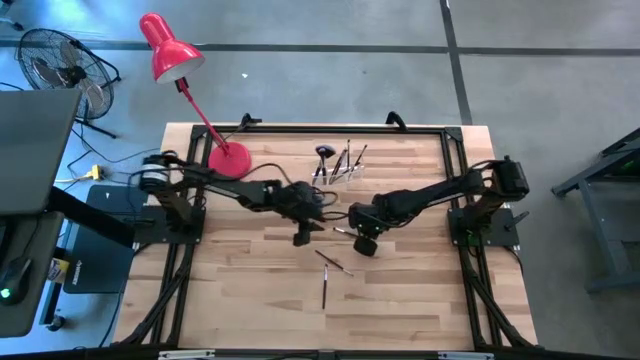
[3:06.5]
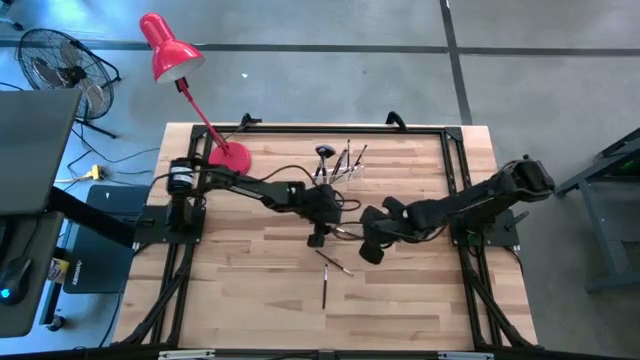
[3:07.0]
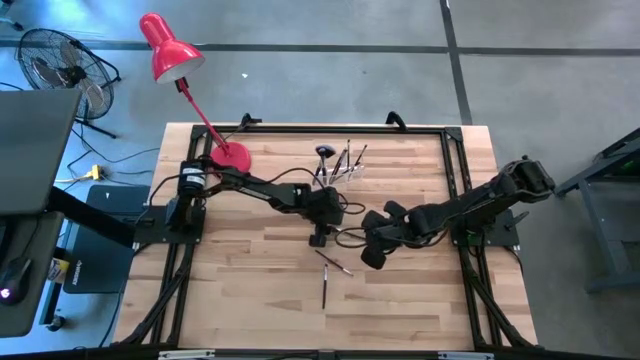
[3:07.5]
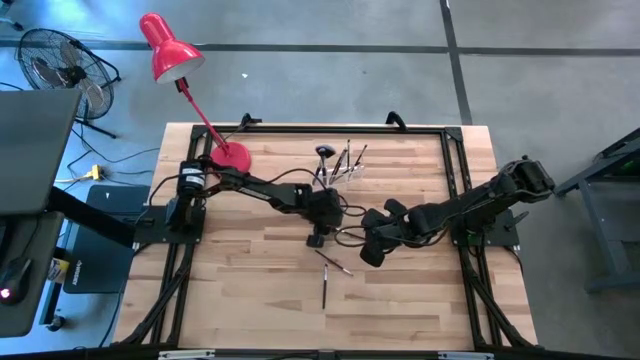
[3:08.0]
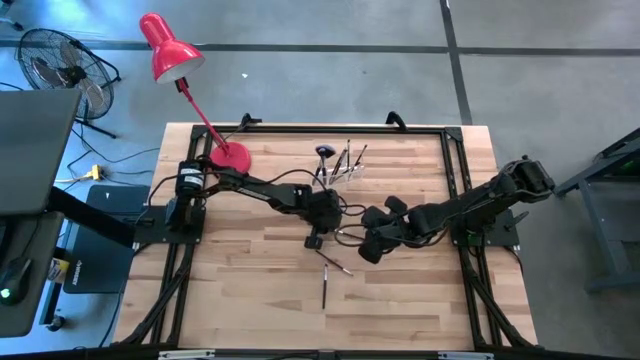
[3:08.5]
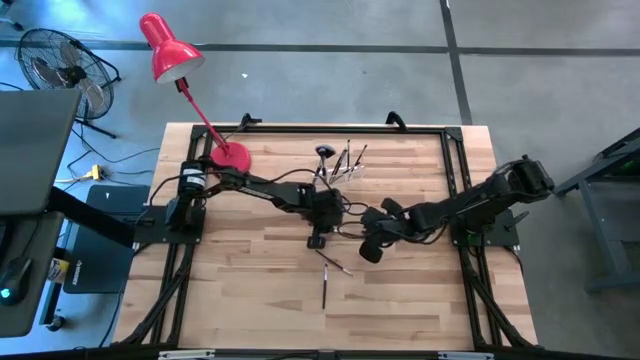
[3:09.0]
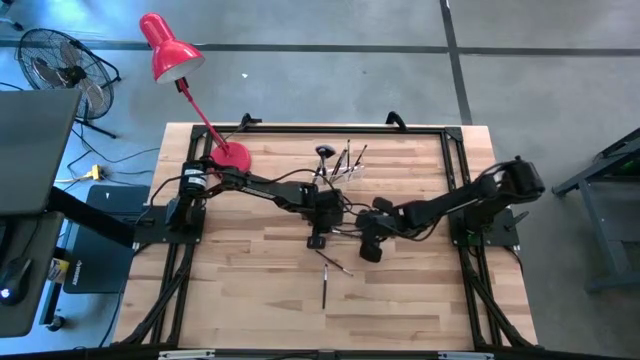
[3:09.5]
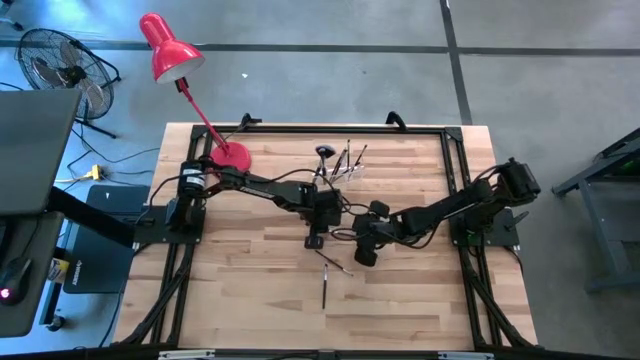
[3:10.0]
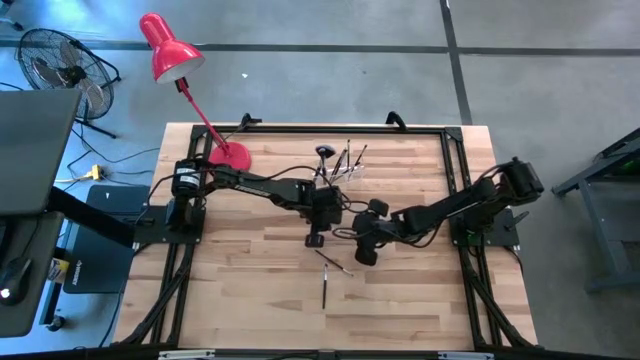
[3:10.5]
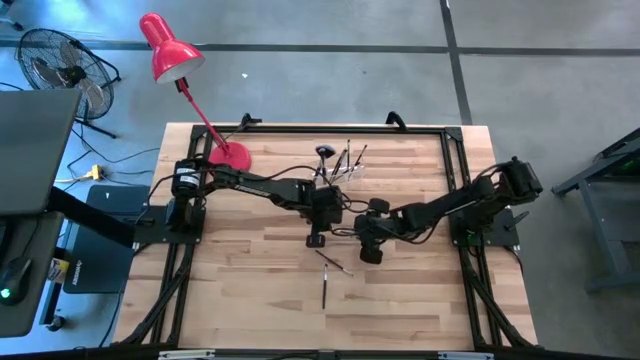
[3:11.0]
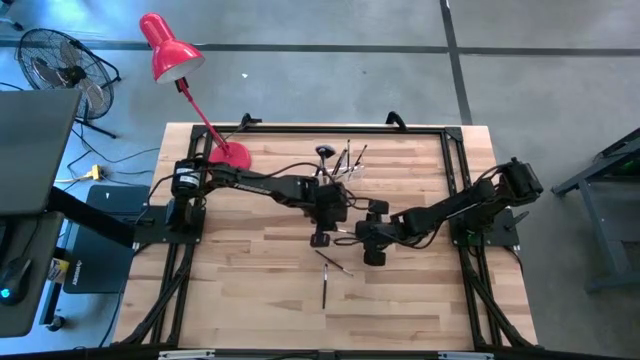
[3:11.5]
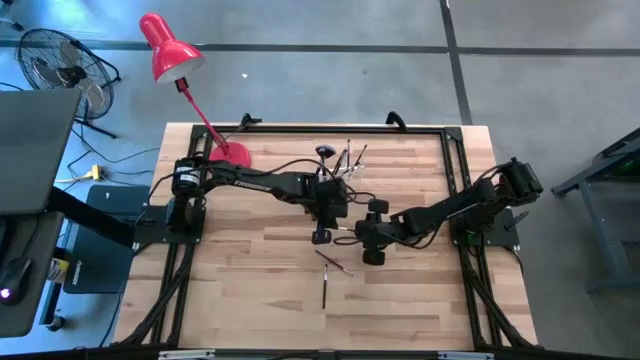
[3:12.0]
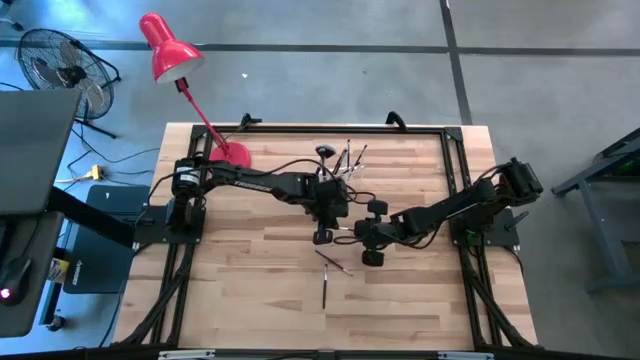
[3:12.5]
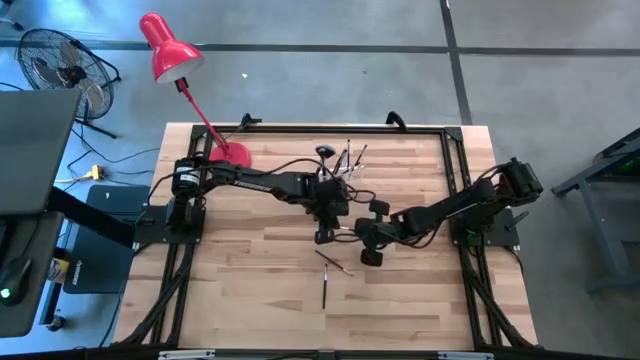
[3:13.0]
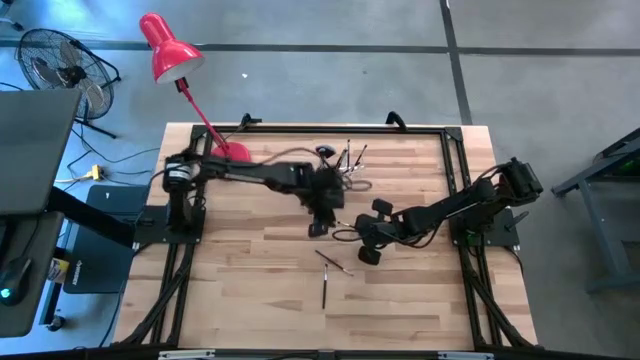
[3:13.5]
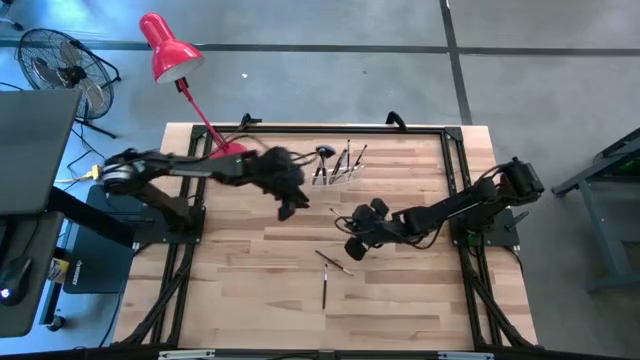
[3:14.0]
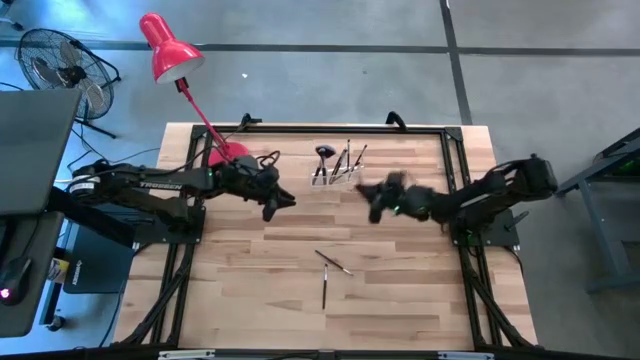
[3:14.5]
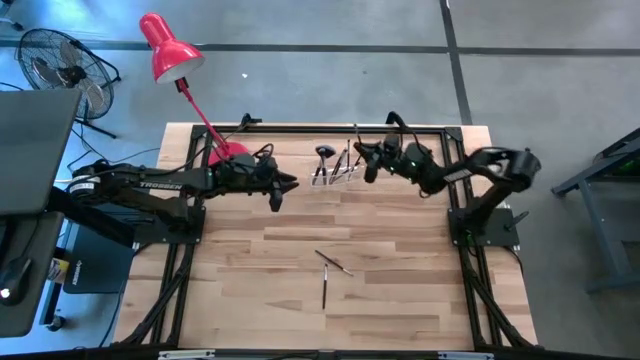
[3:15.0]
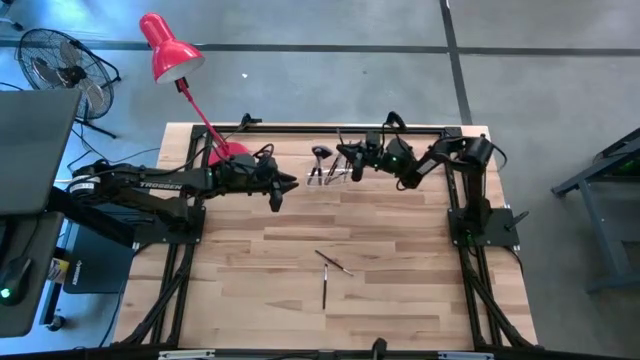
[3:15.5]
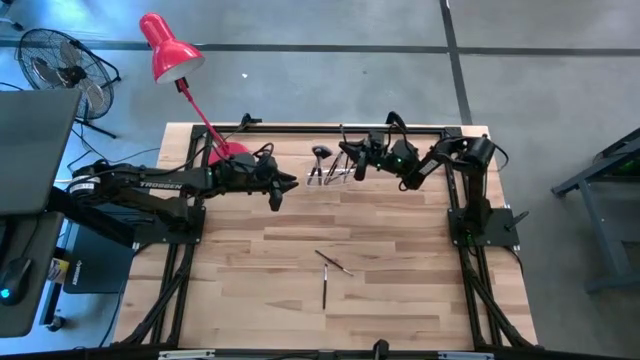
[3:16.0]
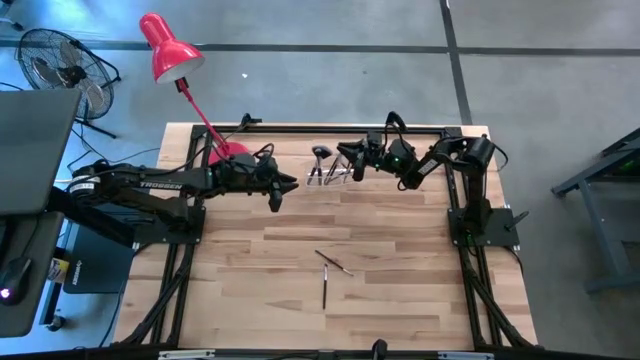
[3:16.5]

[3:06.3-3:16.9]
Task: Put items in baskets/containers
Put the eyeshadow brush into the transparent organizer

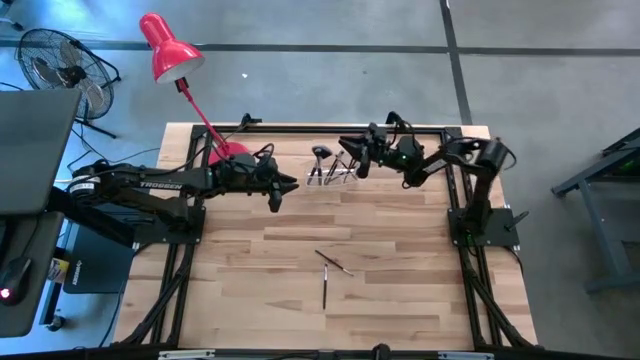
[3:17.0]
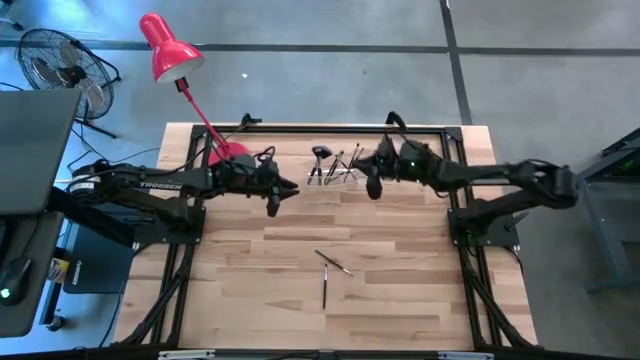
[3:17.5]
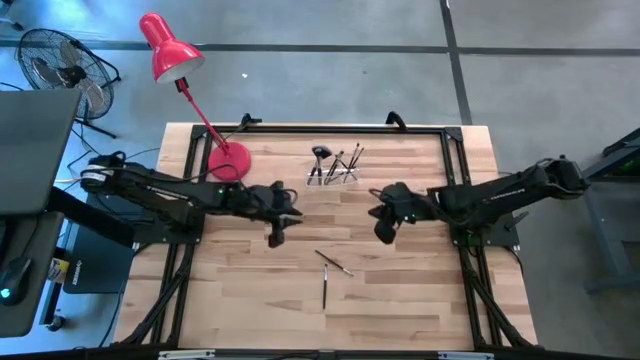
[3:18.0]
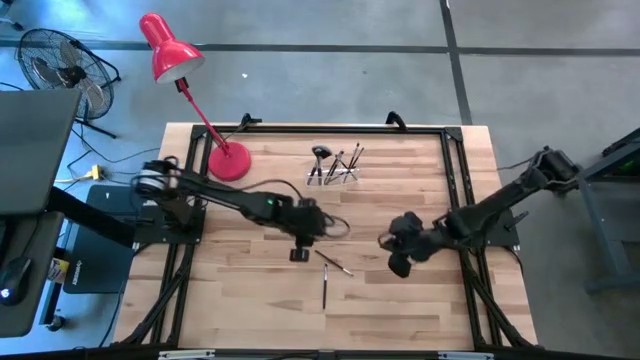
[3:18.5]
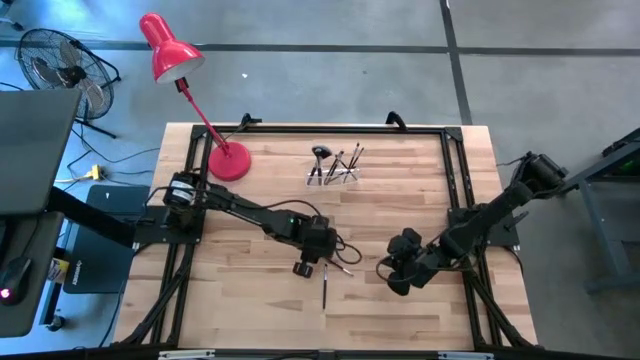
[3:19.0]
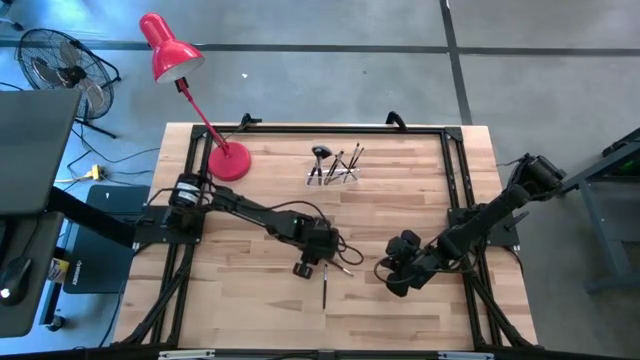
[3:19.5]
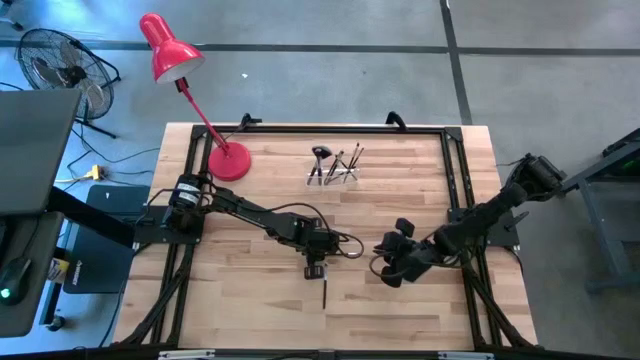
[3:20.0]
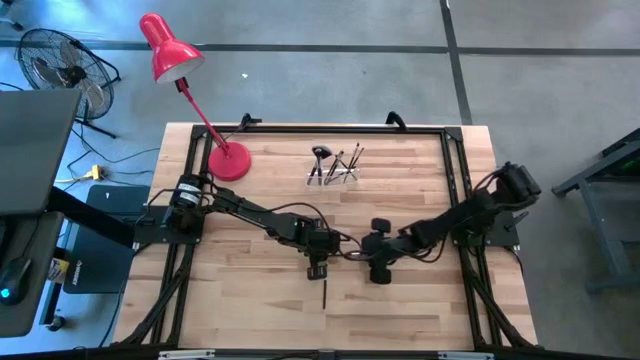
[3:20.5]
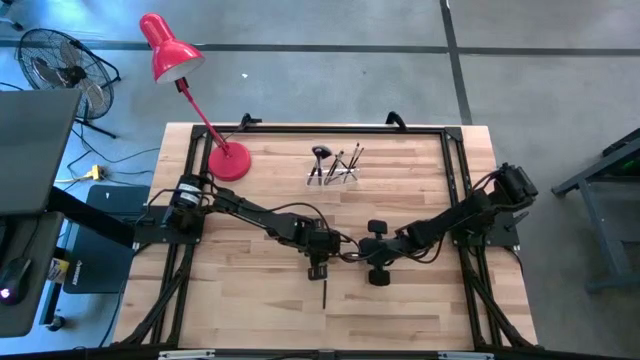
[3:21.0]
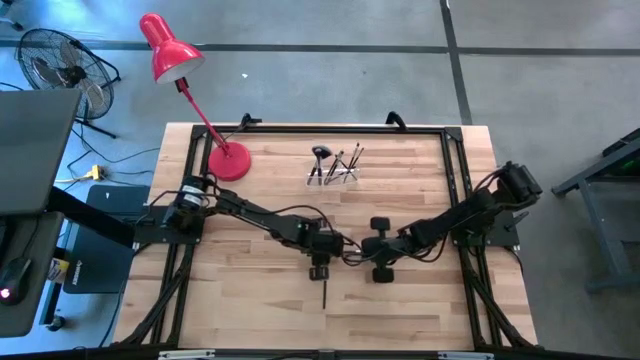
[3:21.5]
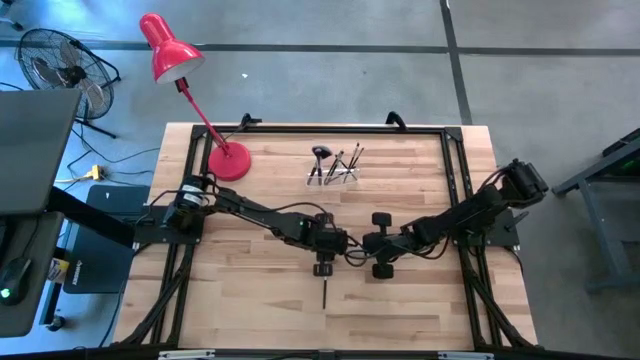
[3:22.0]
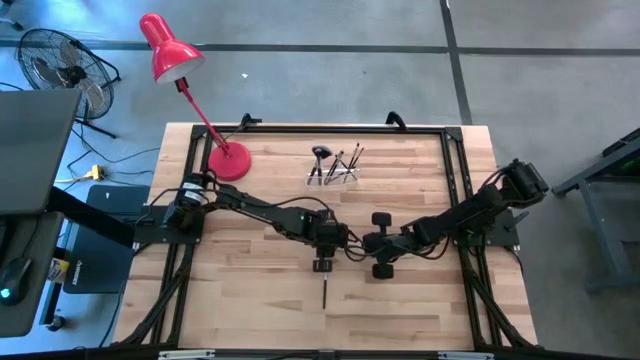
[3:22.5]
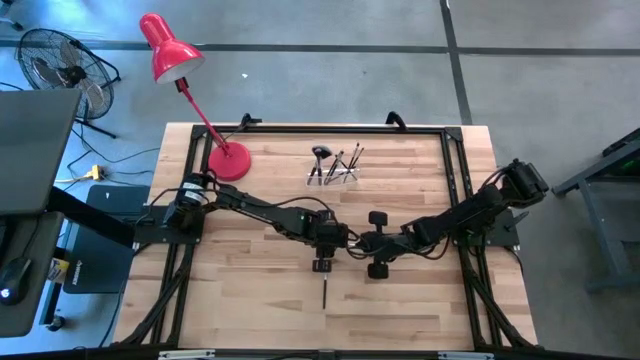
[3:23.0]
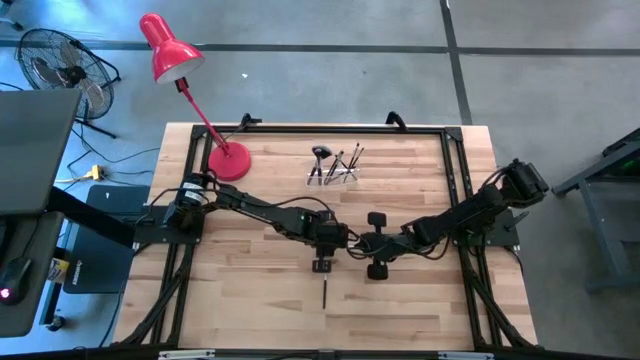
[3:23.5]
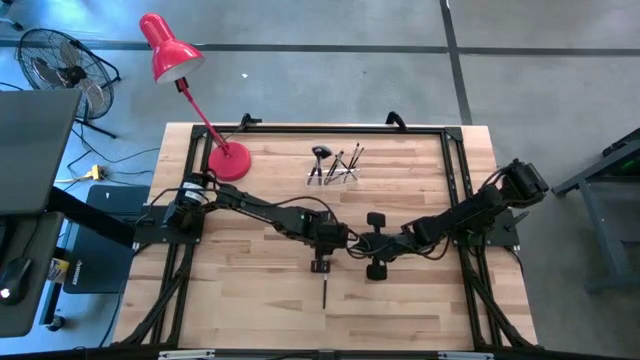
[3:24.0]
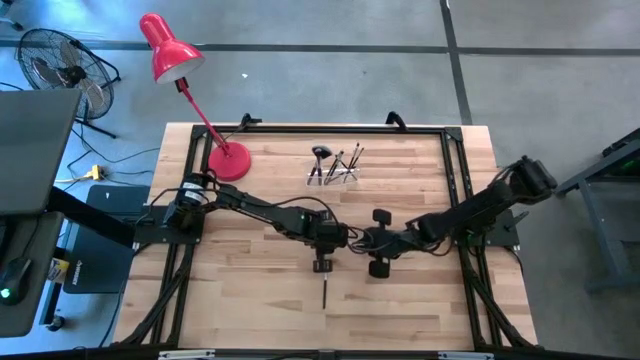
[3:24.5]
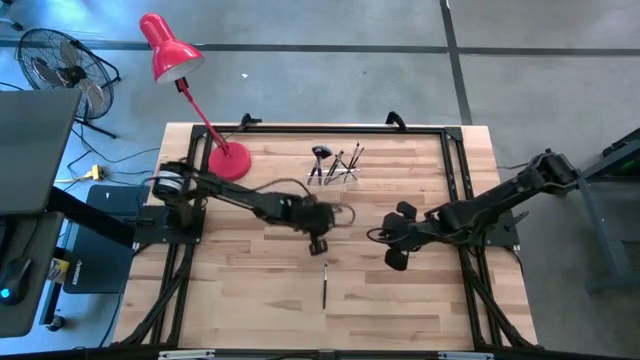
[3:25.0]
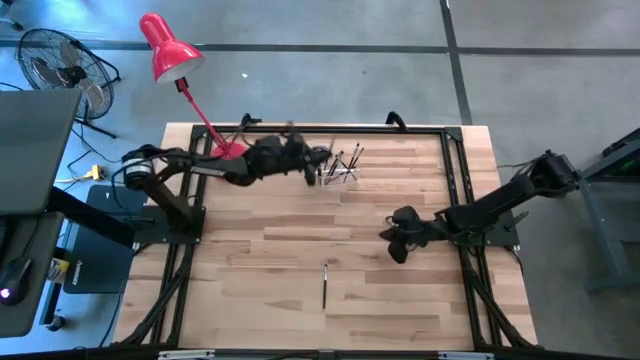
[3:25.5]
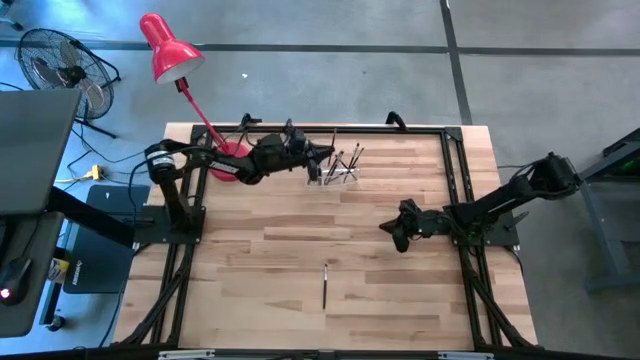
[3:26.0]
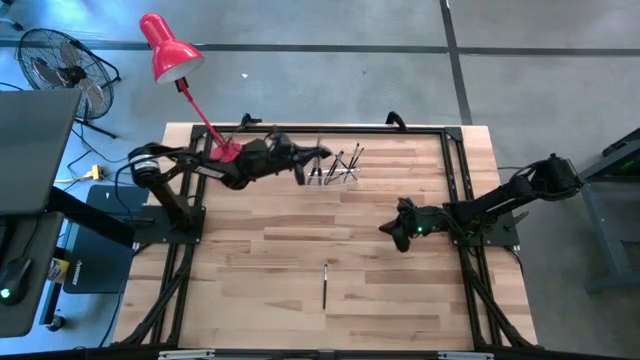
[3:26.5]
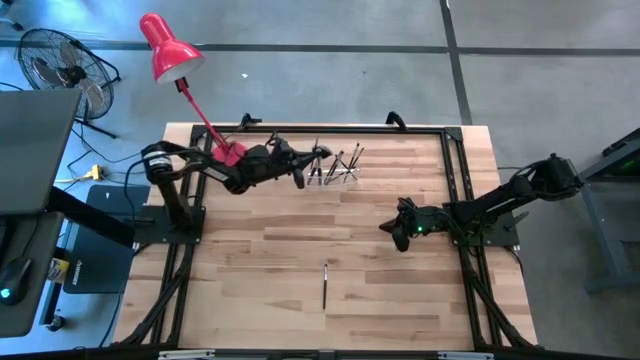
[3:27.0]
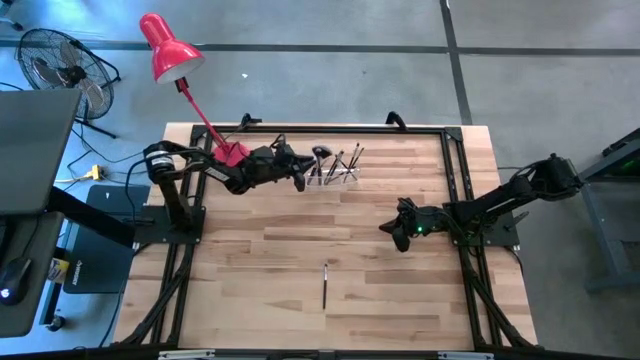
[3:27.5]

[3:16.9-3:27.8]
Put the eyeshadow brush into the transparent organizer
